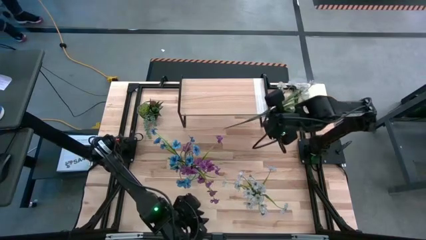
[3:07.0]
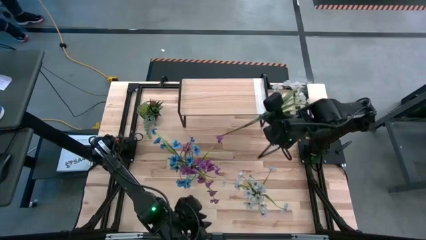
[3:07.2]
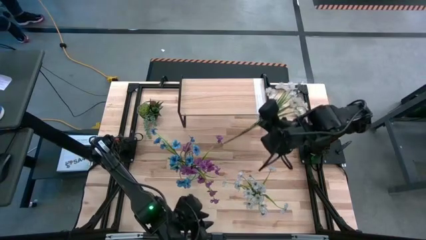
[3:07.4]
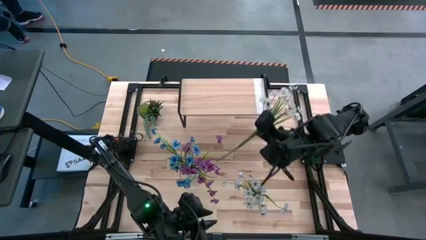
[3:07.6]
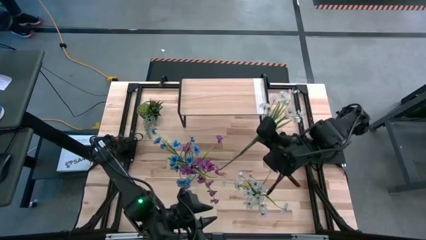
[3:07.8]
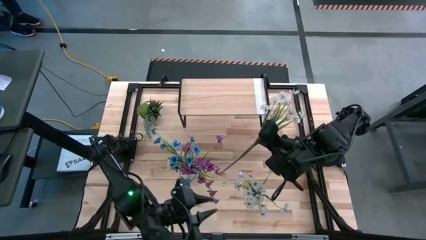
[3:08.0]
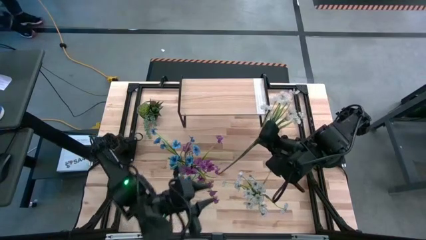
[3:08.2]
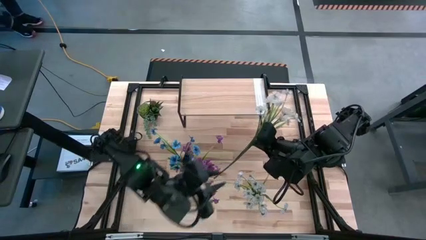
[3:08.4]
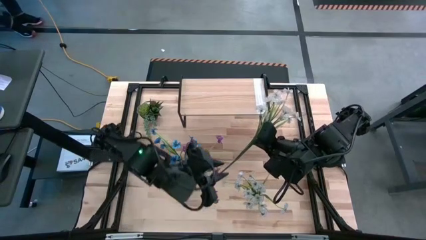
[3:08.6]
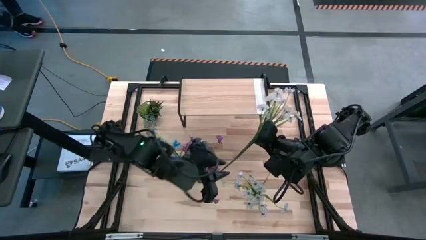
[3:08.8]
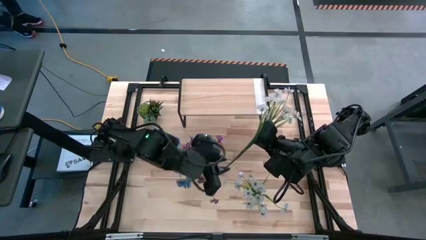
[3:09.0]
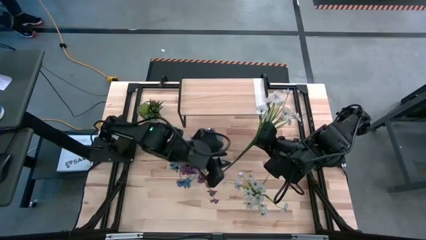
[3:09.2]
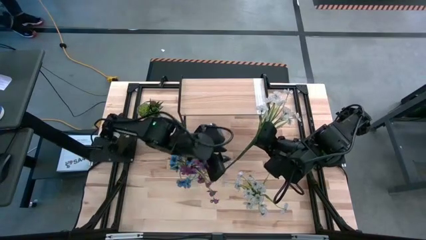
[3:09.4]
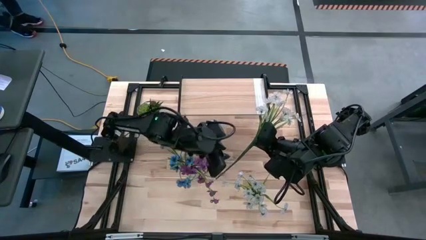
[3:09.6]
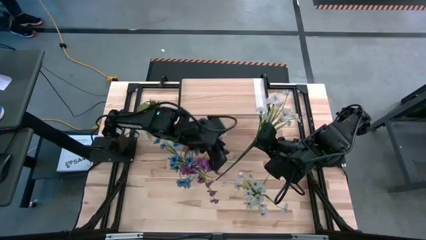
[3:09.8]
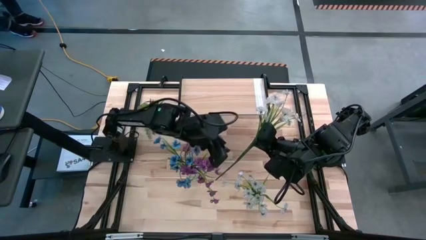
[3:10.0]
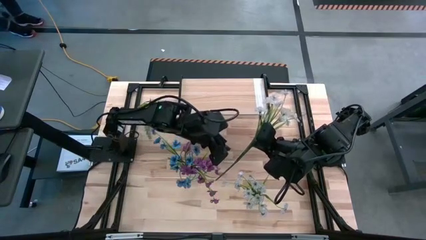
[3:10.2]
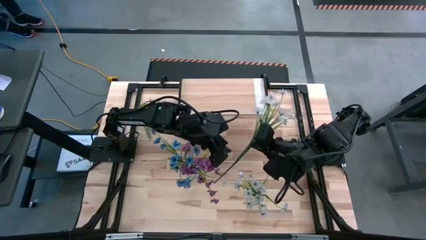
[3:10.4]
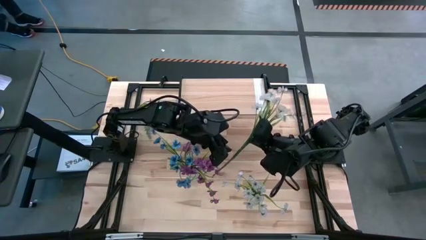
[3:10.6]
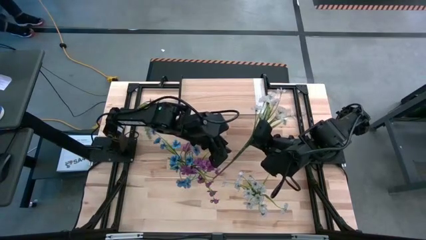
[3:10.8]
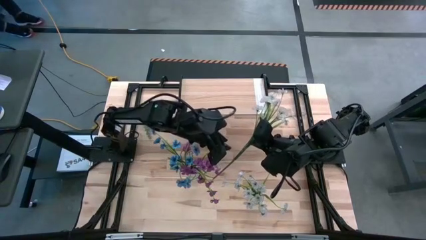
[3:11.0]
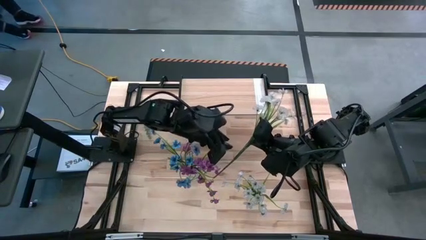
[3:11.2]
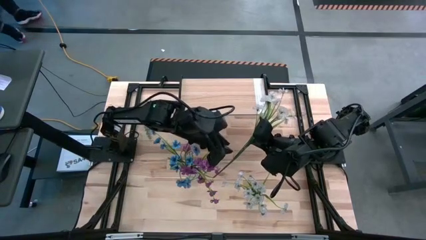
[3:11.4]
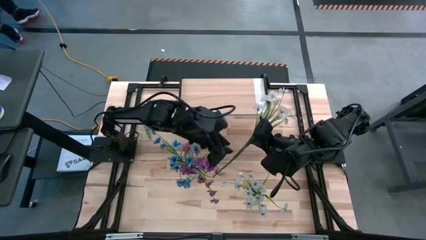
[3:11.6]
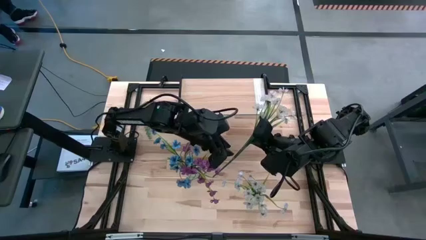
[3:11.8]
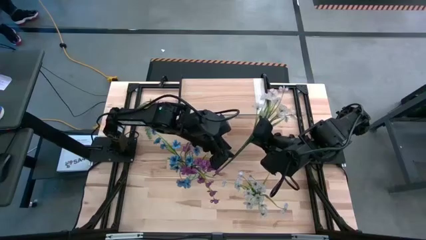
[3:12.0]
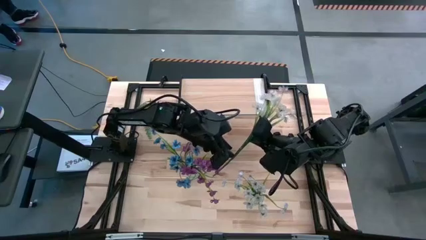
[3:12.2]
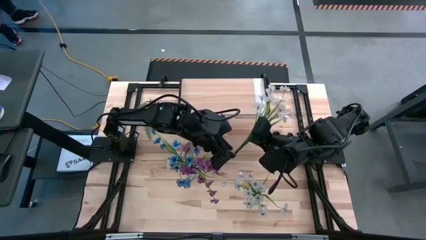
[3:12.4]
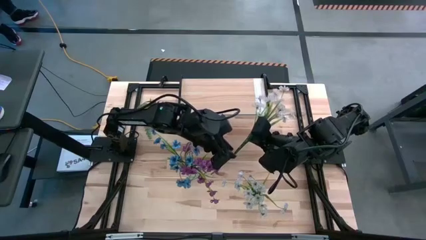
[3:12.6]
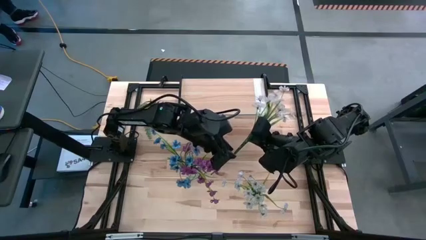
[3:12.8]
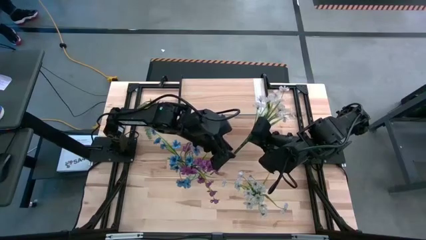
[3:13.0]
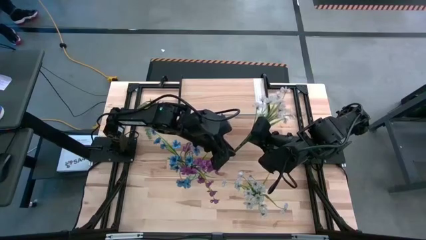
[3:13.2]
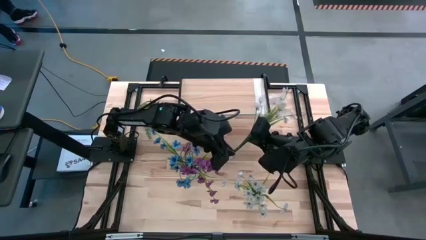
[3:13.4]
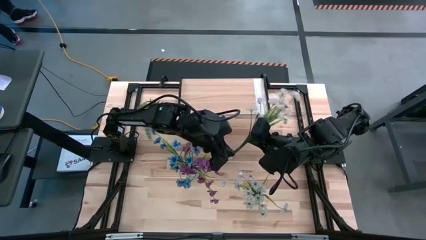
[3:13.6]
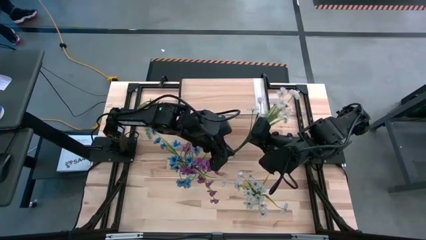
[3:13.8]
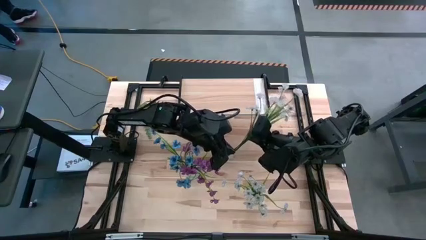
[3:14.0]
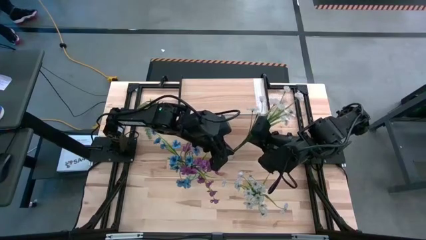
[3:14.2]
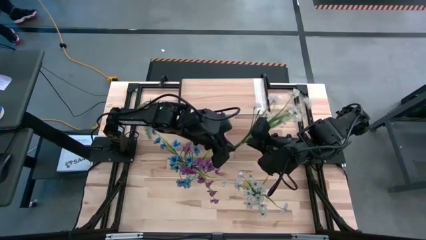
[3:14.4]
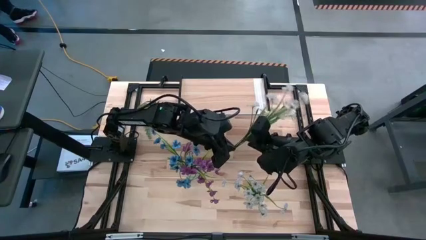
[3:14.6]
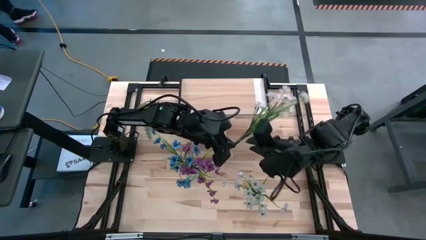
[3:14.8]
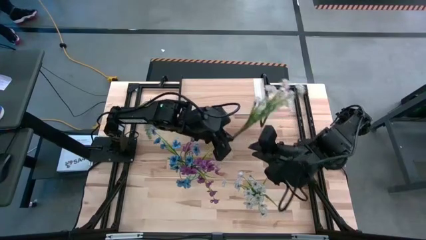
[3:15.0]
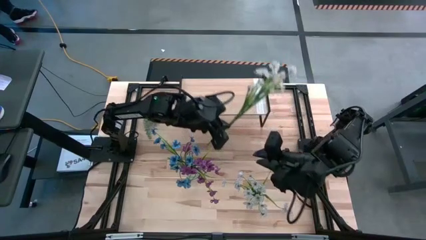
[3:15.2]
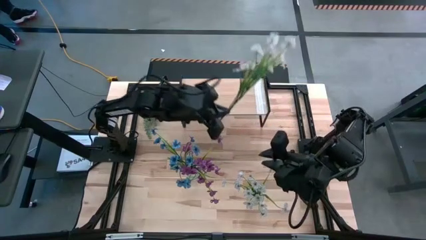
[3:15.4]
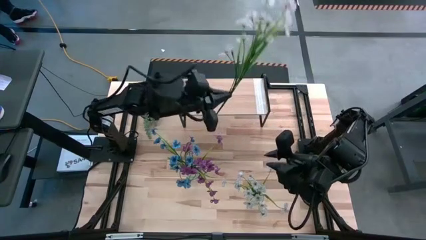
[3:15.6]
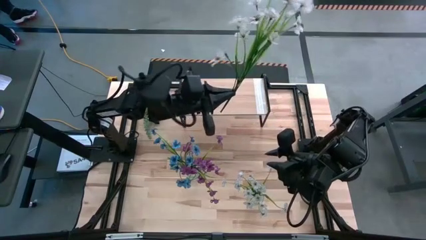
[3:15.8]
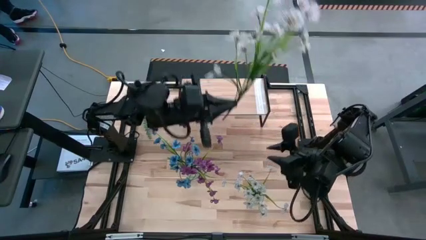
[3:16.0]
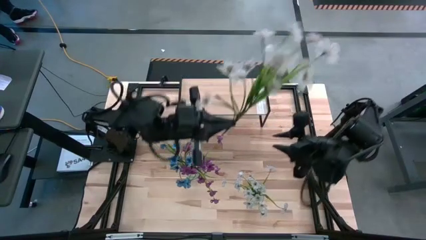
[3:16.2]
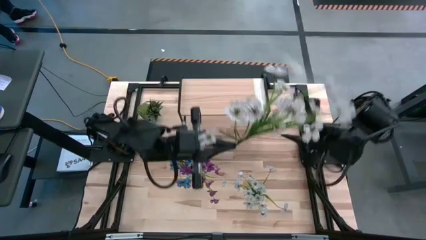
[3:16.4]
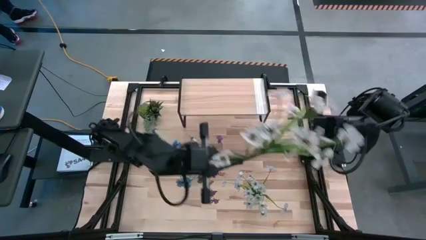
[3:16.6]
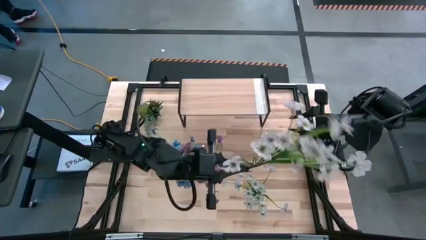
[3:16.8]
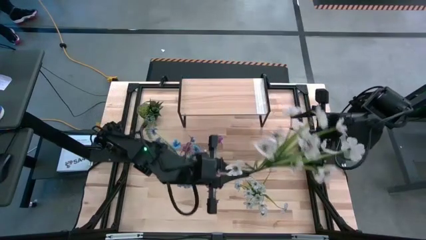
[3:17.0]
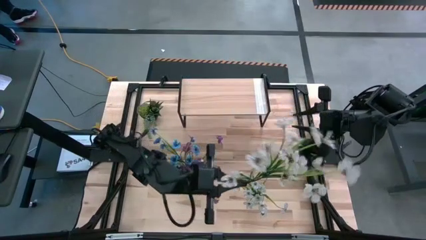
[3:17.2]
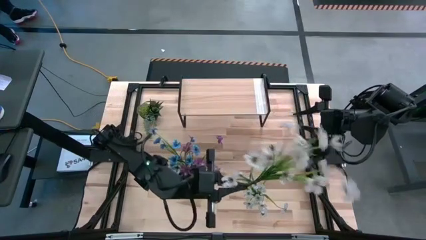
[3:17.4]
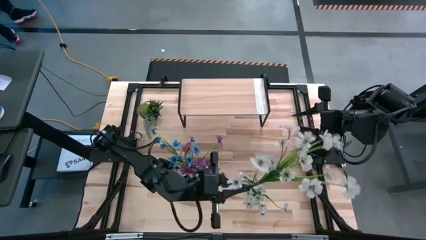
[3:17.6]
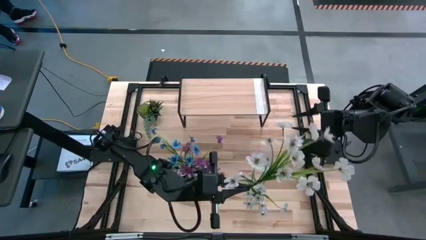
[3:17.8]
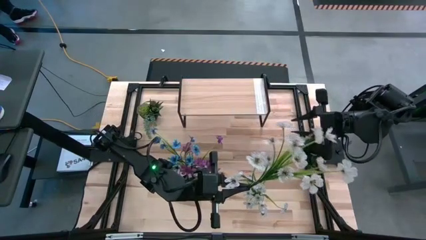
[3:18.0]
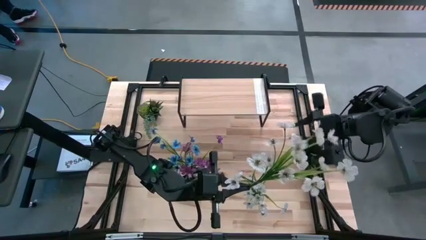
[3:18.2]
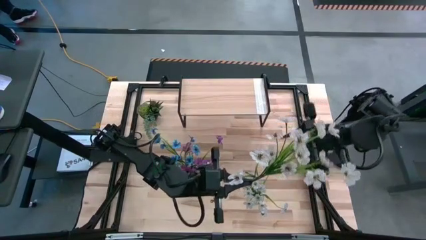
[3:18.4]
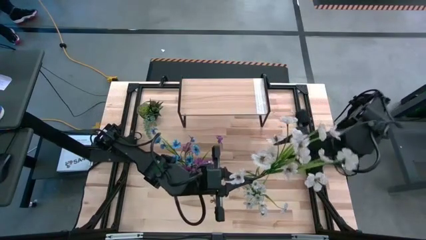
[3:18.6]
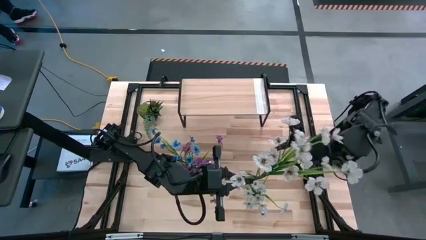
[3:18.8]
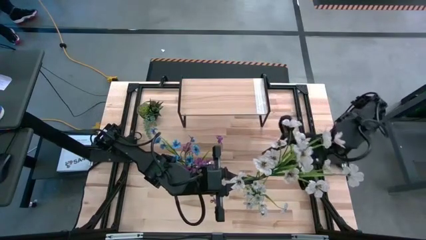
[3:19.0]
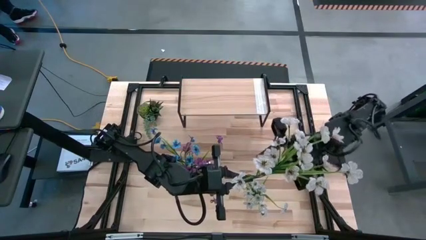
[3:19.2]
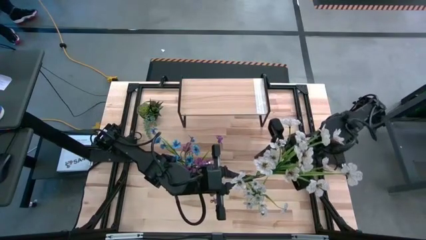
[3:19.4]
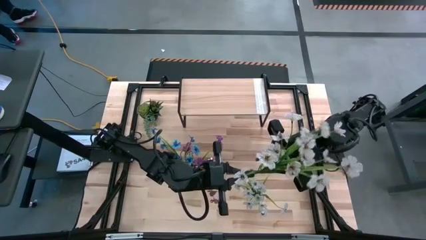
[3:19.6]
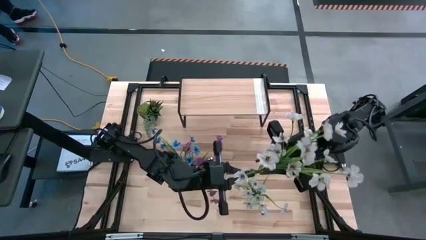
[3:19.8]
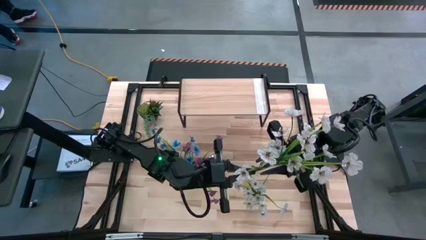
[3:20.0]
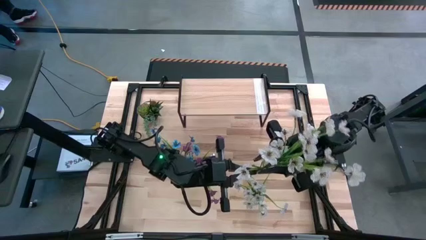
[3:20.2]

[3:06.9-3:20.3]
Task: Pick and place flowers into a vace then onto a shelf
Put the white flowers into the right transparent vase

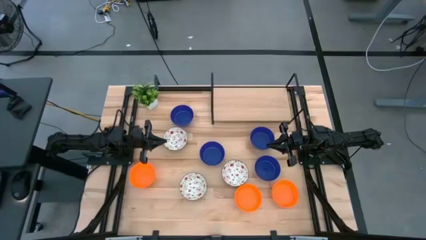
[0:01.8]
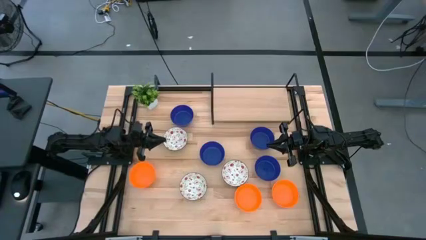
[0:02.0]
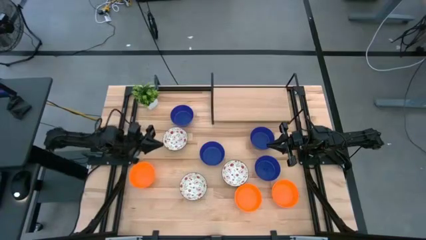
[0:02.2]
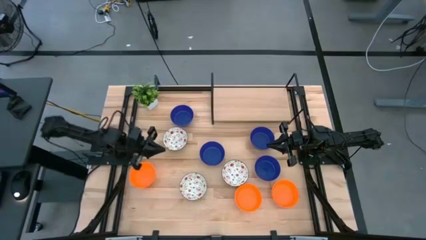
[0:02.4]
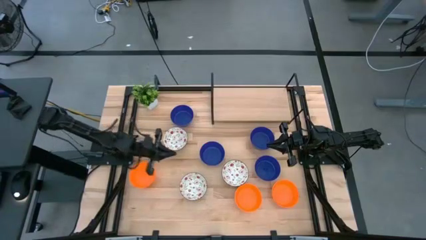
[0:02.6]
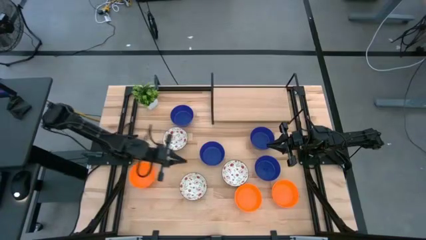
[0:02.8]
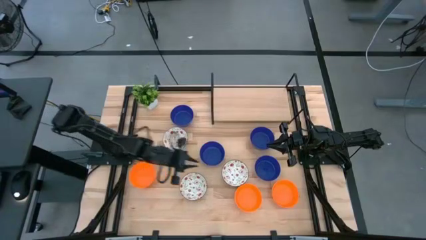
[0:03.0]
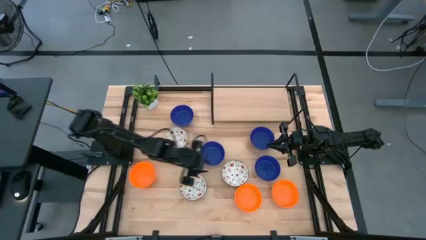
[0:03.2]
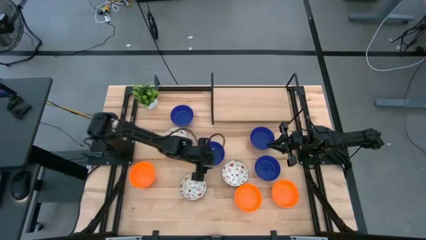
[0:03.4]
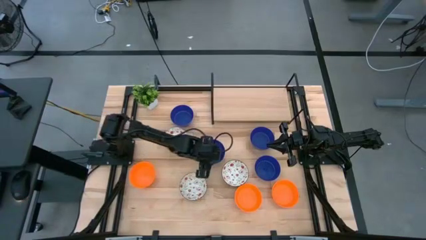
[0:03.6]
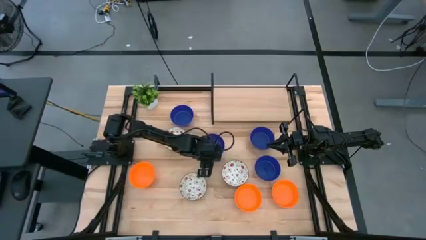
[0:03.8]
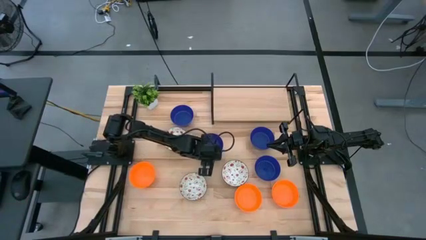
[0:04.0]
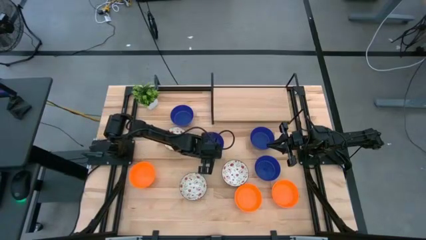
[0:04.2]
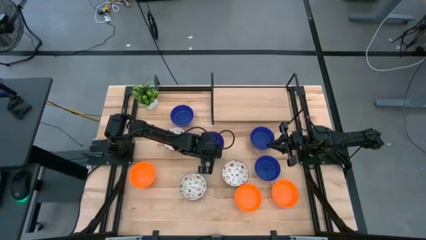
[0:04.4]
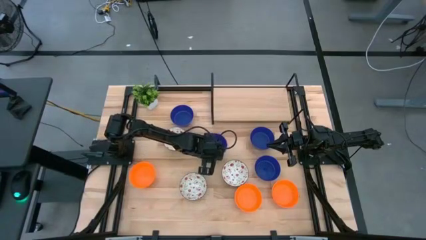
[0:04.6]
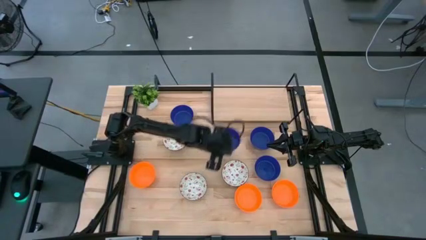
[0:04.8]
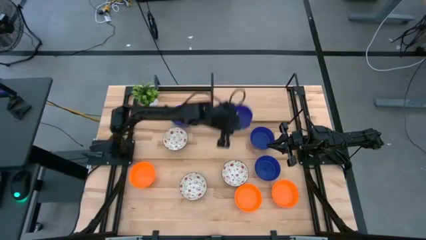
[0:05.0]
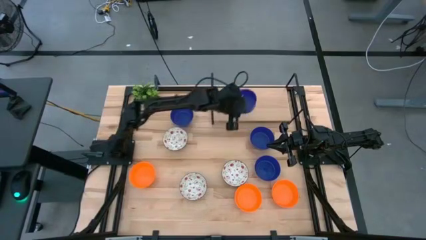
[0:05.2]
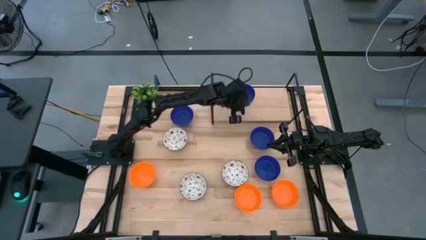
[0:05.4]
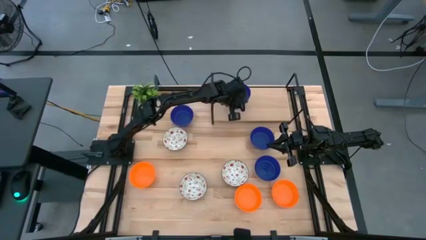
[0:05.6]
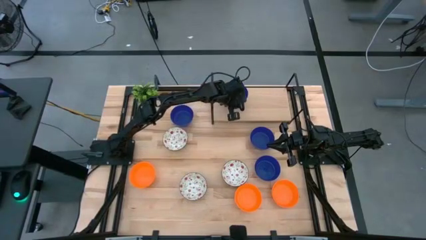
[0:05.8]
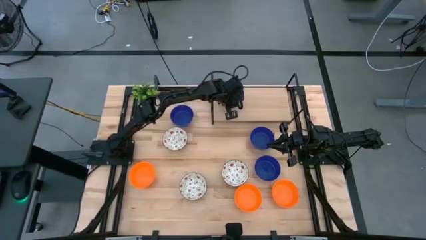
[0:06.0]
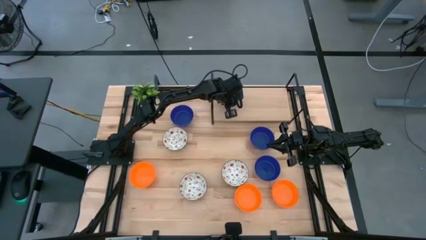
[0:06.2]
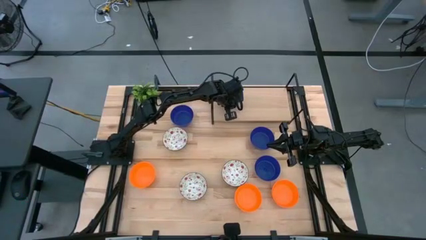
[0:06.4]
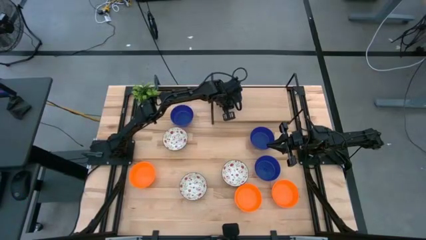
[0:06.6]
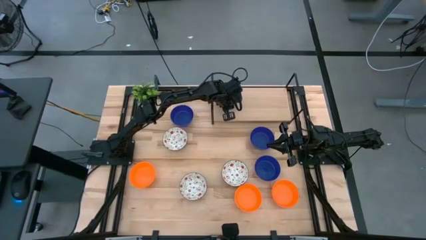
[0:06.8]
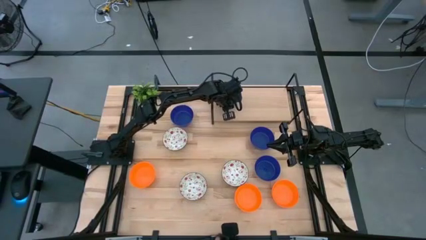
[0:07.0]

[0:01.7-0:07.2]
Task: Pick & Place Mini bowls
Put the blue bowl on the shelf
